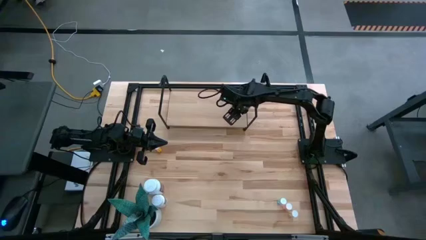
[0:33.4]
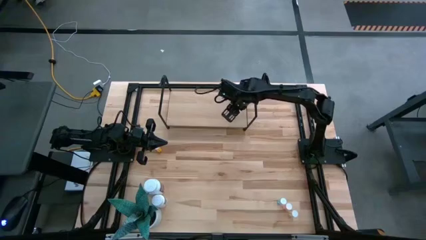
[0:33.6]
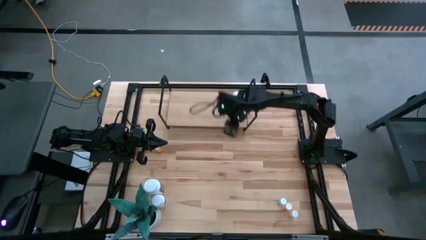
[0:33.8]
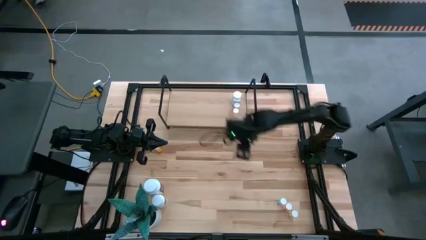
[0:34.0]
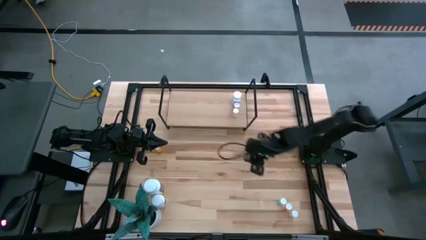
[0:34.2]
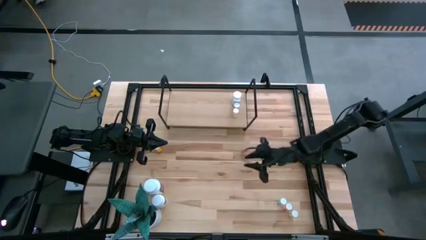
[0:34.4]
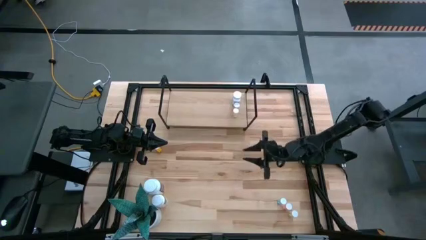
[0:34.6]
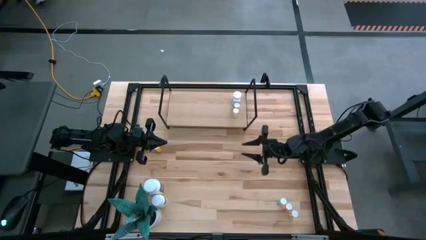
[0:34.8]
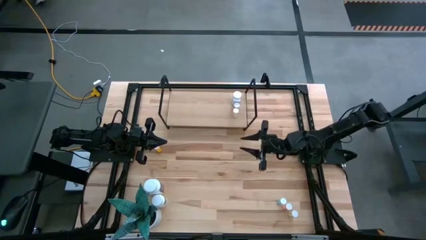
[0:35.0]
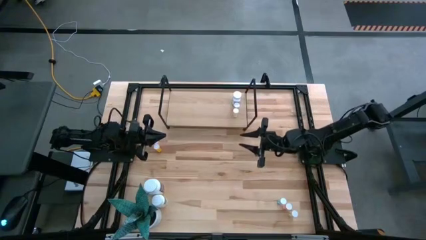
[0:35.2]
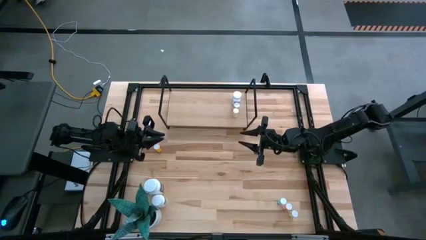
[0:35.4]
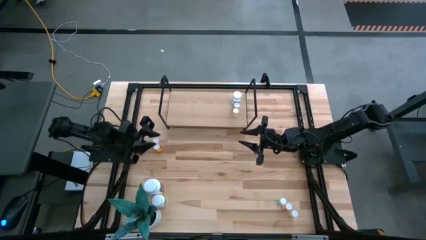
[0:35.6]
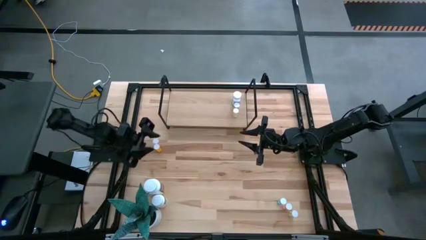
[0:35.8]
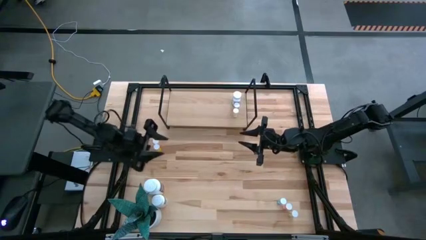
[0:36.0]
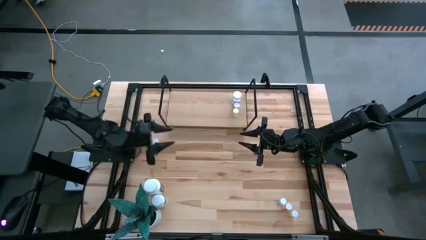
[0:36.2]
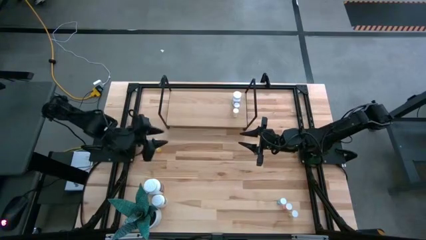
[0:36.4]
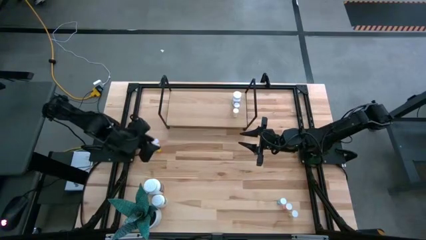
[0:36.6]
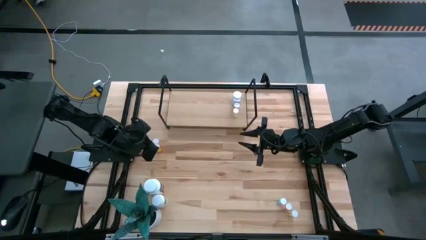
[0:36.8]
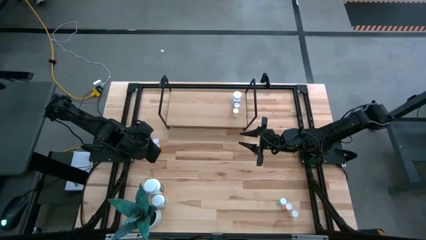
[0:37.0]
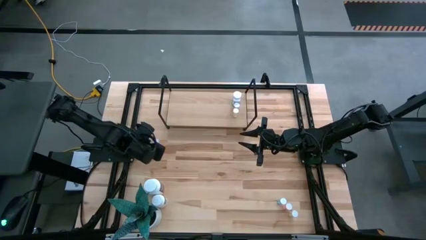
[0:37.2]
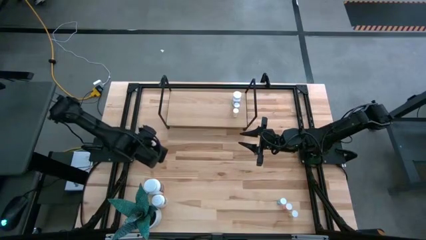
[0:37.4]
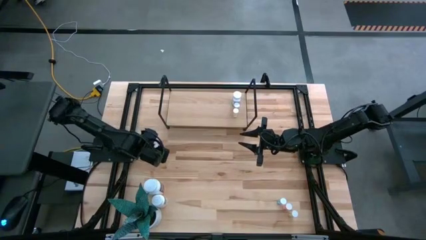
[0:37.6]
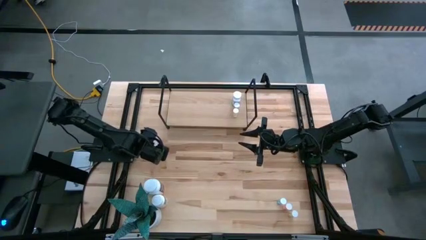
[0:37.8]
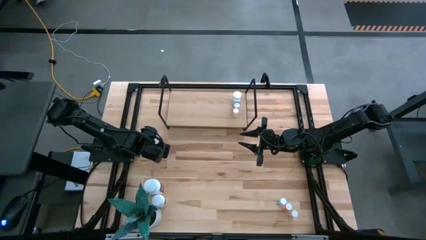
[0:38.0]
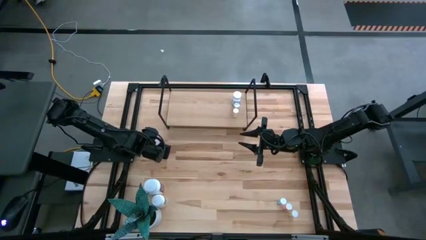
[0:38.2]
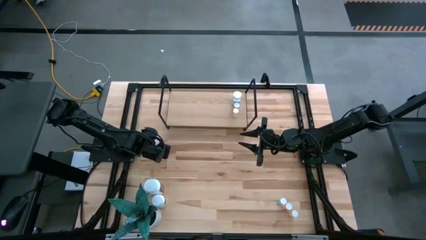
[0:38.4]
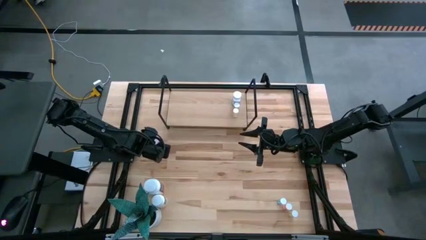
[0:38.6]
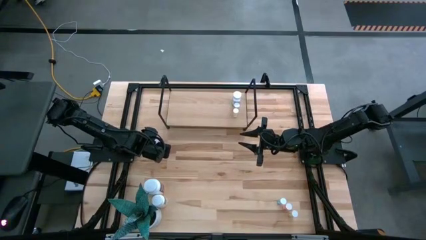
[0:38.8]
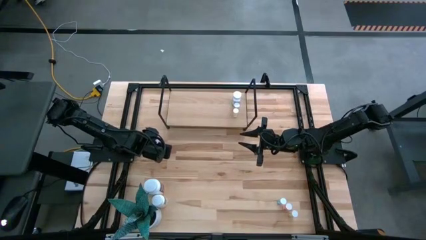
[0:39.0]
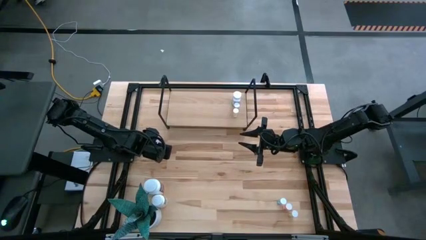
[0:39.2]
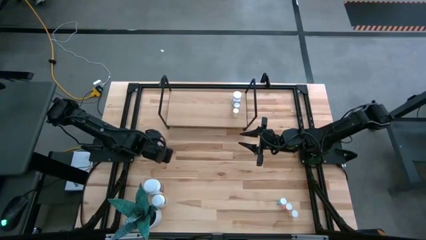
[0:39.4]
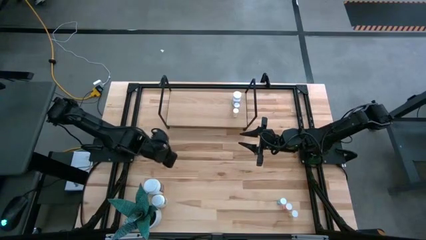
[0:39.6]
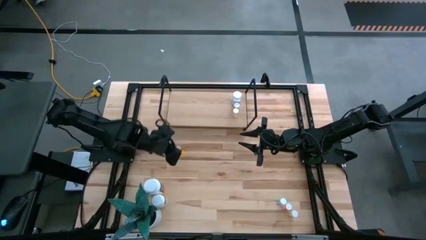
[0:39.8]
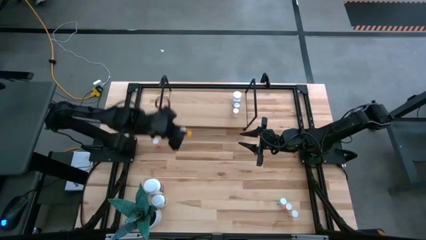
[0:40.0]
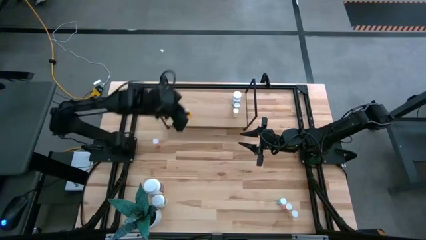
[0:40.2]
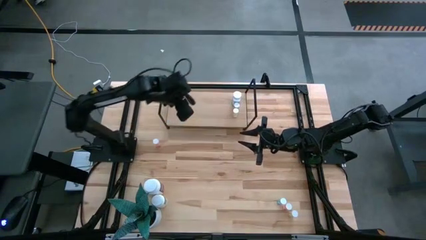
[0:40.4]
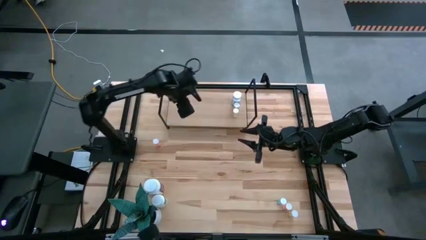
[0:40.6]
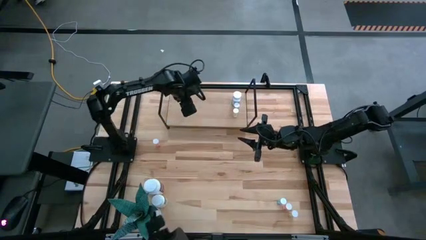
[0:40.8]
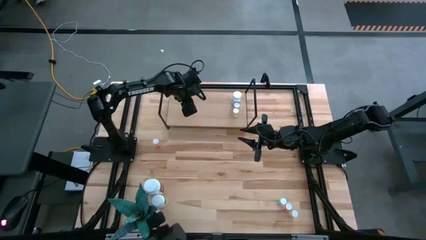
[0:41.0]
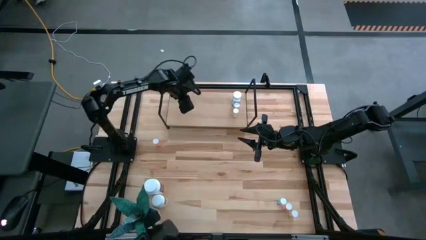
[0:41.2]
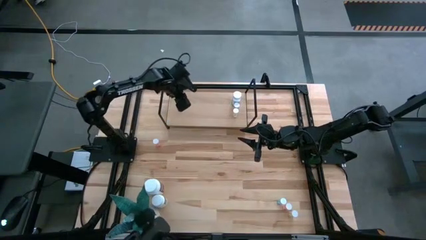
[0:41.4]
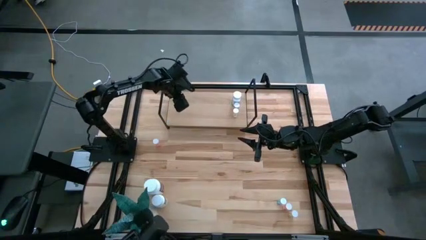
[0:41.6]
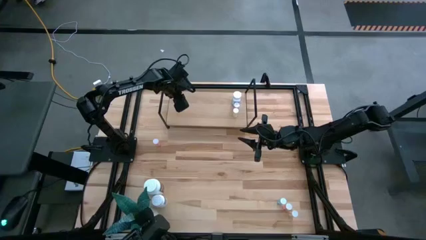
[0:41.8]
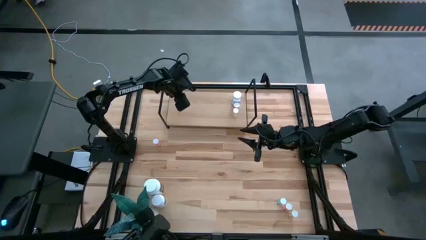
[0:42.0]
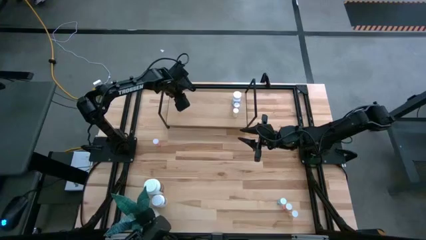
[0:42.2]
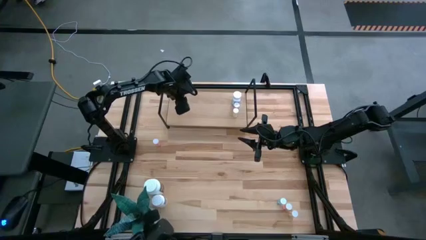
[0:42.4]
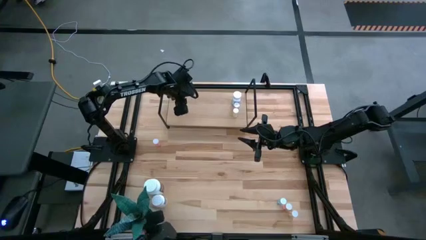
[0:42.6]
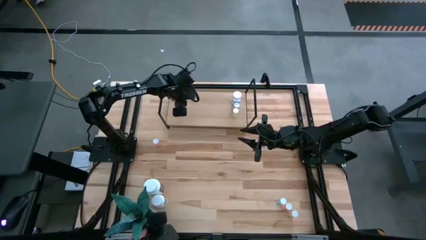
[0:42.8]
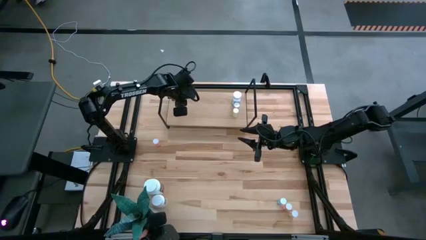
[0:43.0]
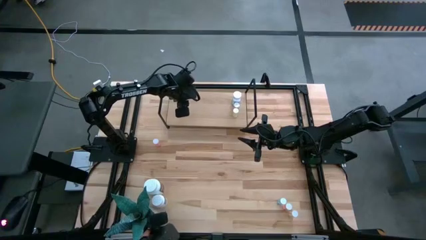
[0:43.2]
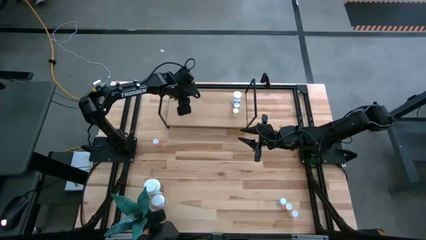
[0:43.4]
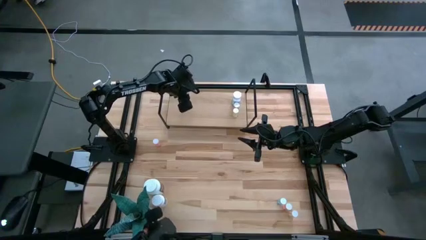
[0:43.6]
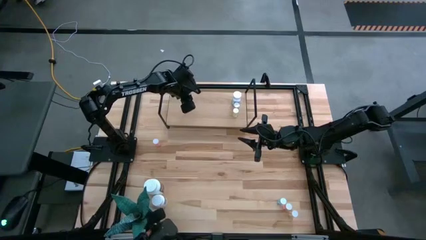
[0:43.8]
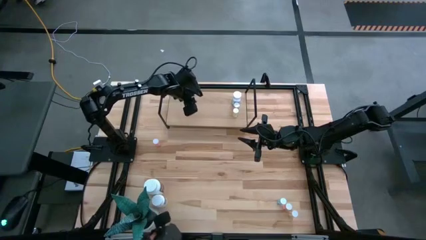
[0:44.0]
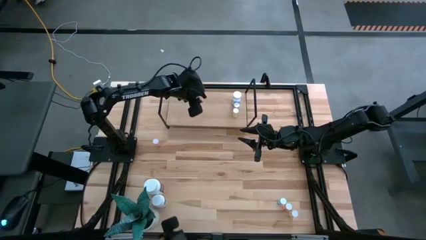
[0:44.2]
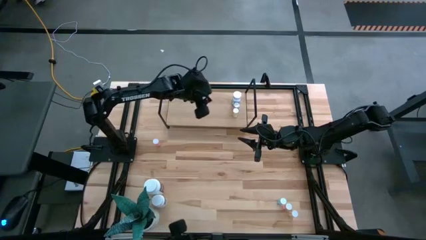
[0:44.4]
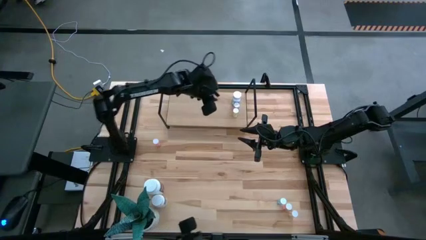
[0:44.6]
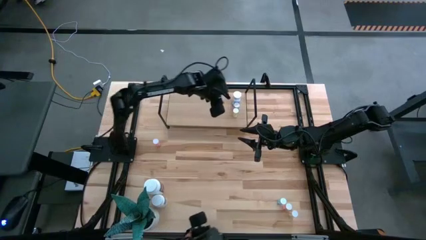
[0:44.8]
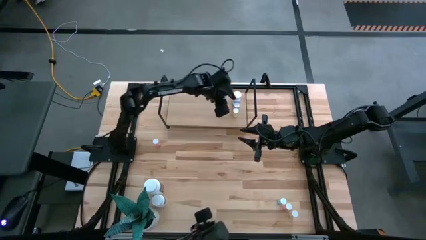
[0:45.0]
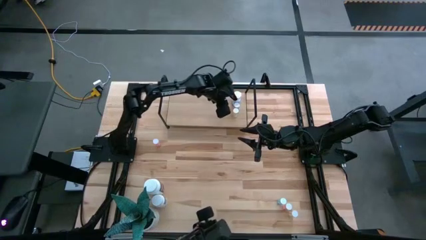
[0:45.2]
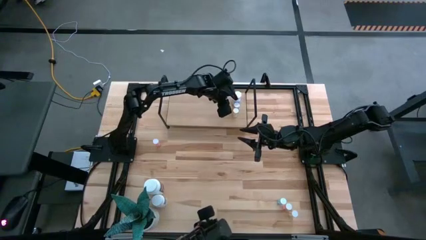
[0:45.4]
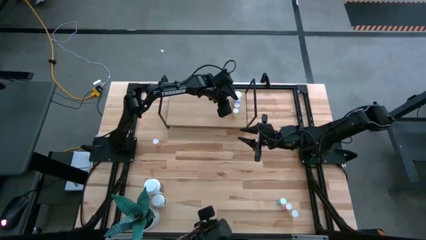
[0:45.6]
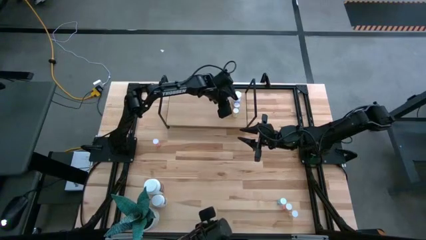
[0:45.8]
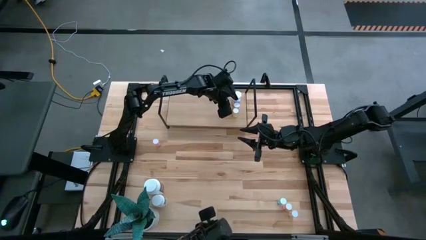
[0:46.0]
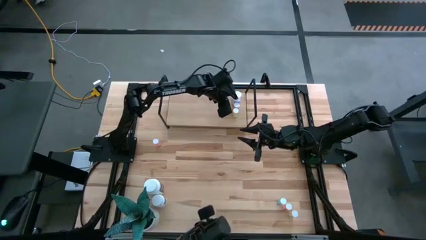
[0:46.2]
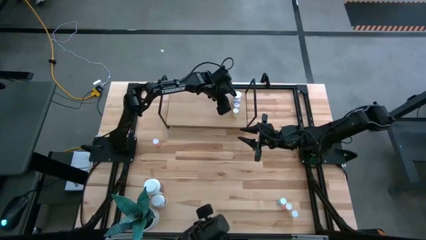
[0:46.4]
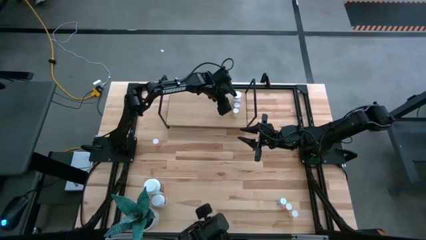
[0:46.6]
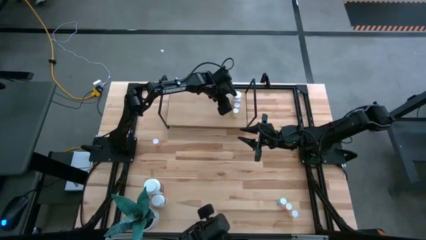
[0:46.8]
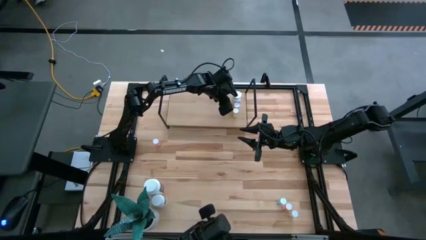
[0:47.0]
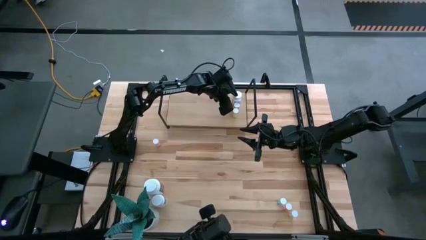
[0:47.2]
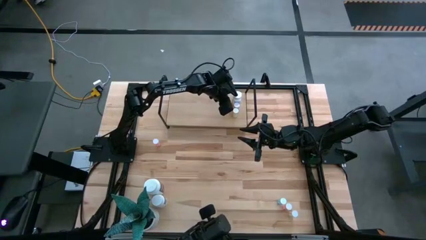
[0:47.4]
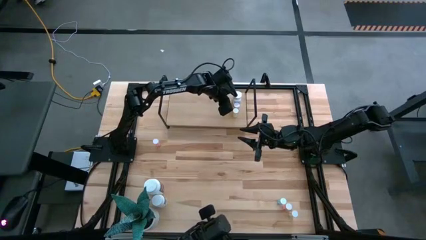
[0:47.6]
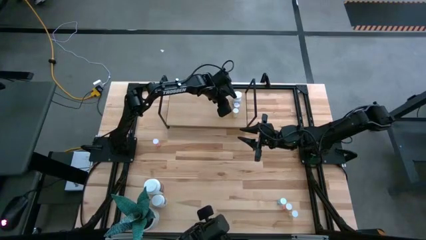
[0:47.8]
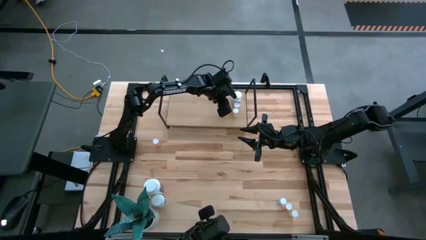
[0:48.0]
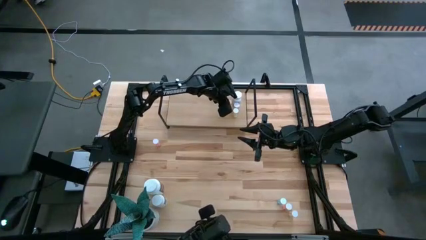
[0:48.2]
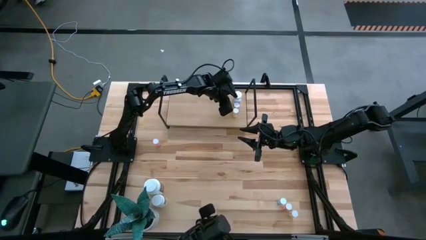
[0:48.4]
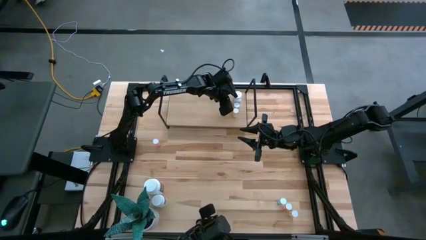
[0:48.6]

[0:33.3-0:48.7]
Task: Pick and place medicine bottles onto shelf by color
Put the orange pill bottle on the shelf
